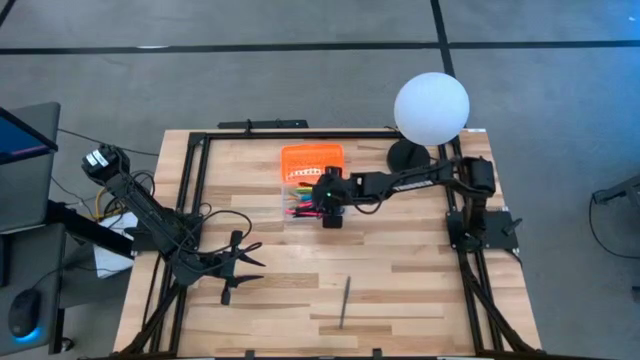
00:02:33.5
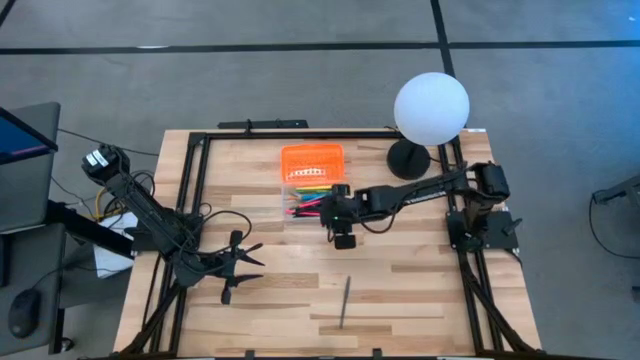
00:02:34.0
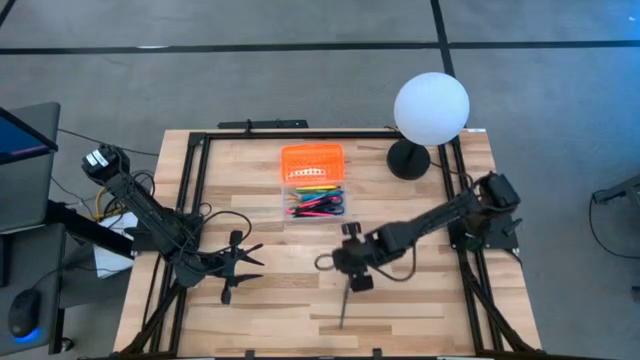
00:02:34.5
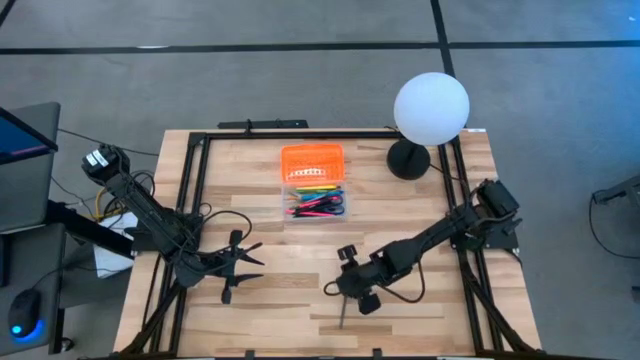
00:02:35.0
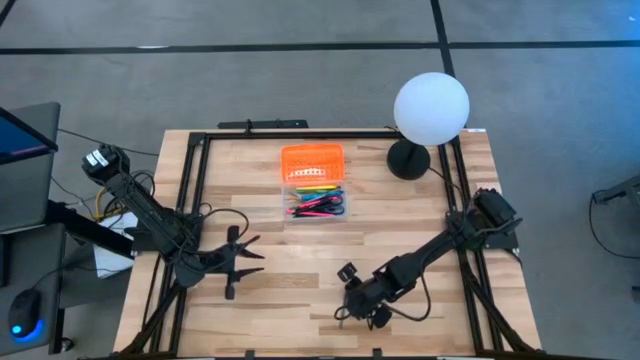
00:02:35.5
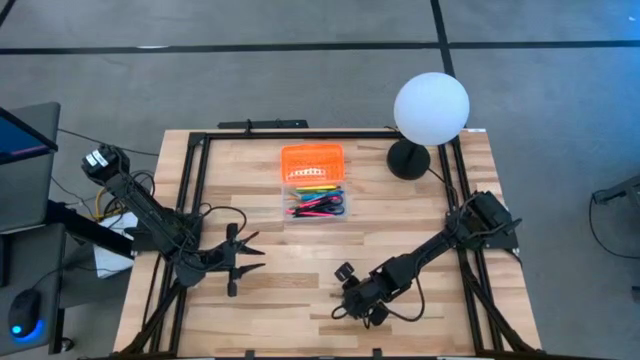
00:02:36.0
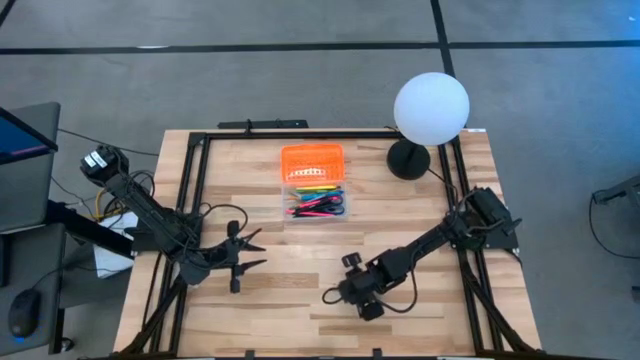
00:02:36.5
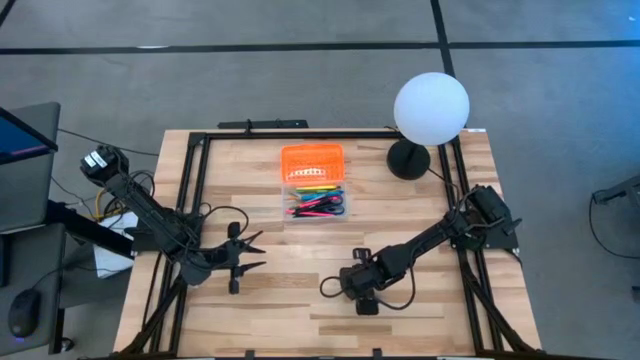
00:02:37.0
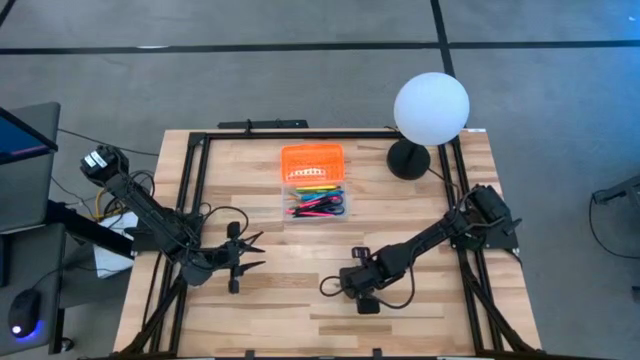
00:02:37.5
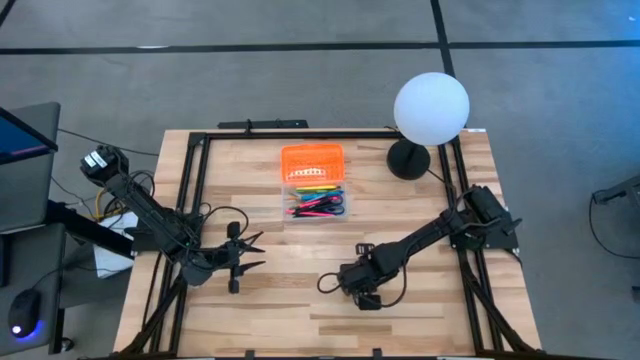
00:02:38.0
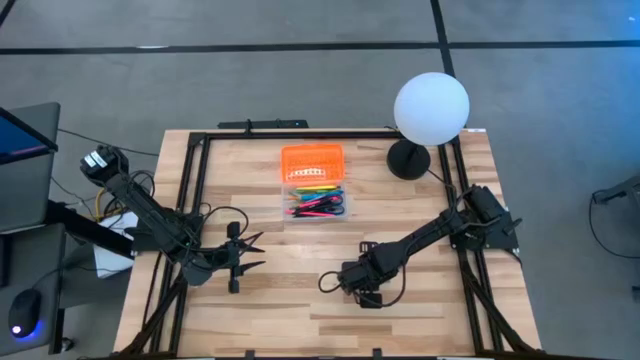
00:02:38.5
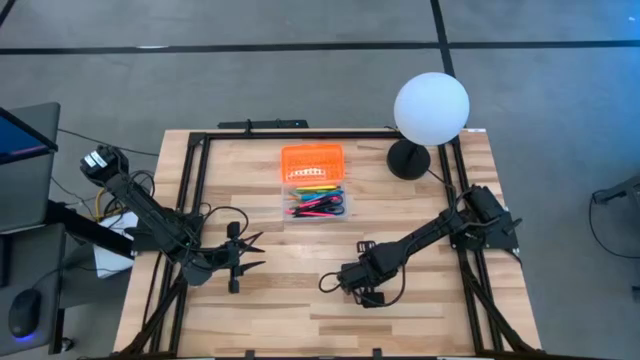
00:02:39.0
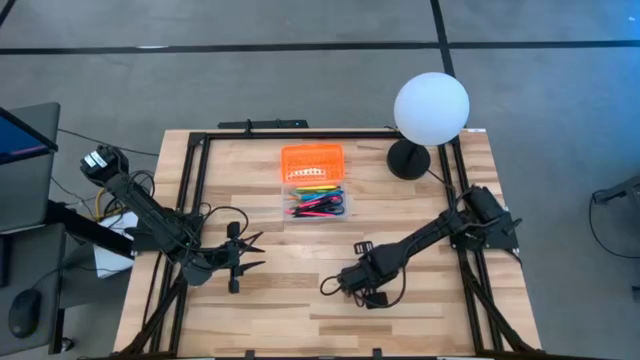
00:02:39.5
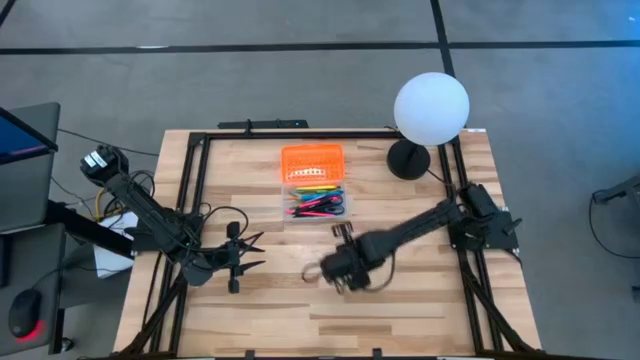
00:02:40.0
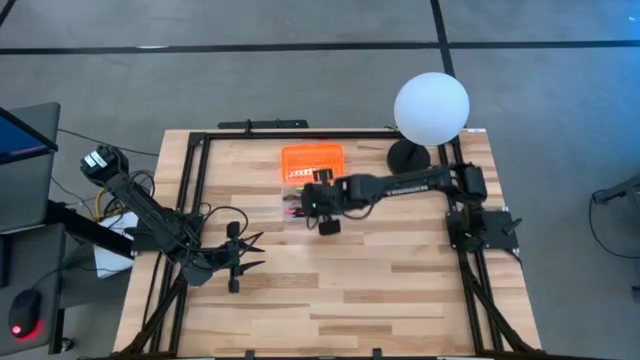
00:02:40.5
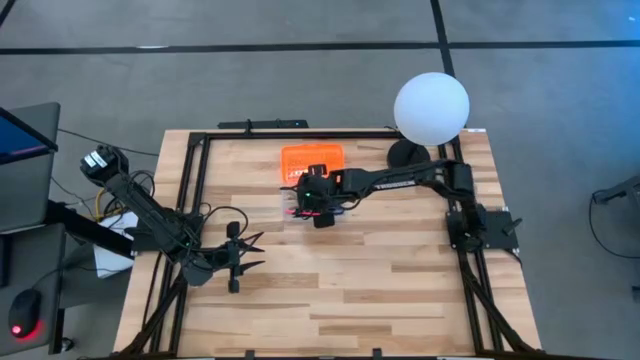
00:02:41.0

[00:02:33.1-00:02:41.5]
Task: Pick & place school supplies into a supply box
Put the gray pen into the supply box

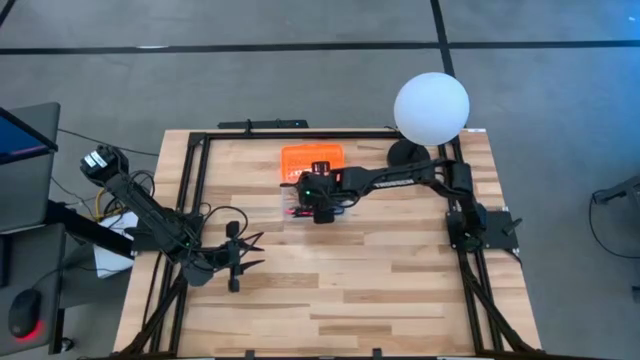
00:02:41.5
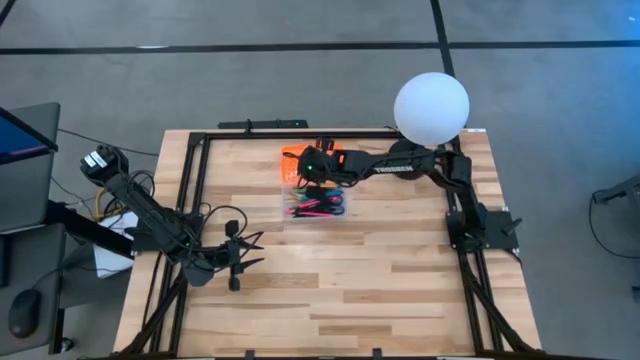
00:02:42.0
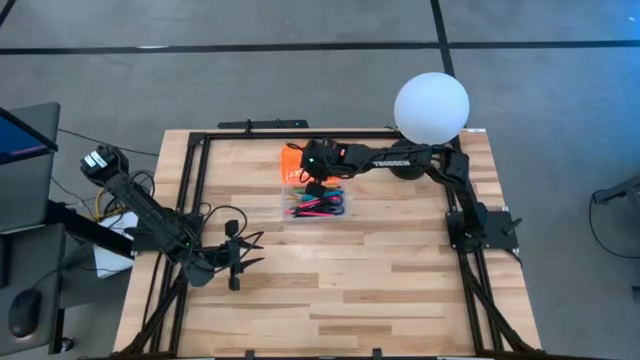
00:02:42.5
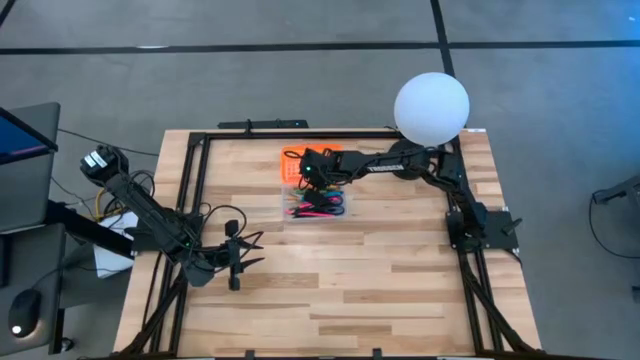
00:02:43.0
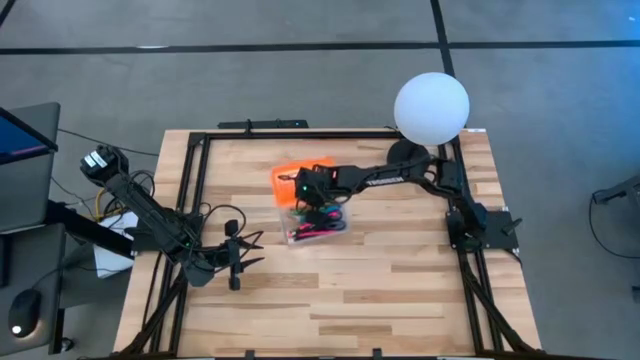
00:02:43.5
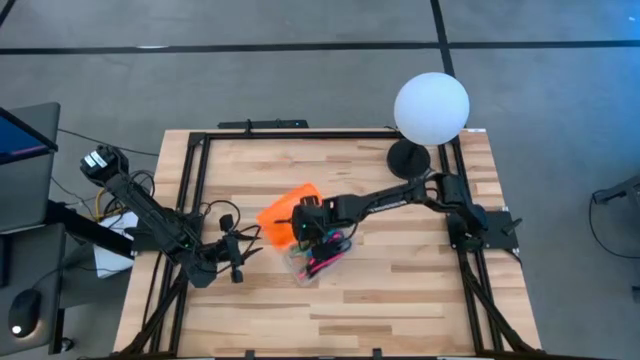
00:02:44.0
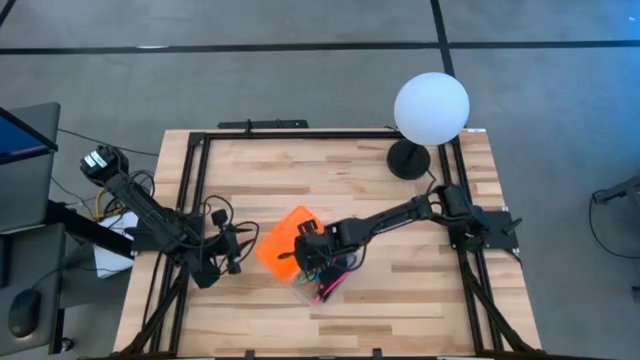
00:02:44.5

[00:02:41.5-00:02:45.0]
Move the supply box to the center of the table

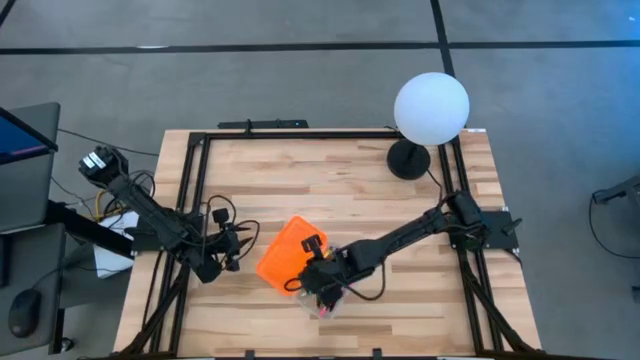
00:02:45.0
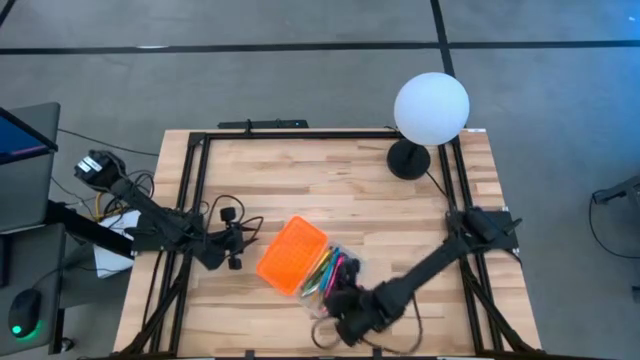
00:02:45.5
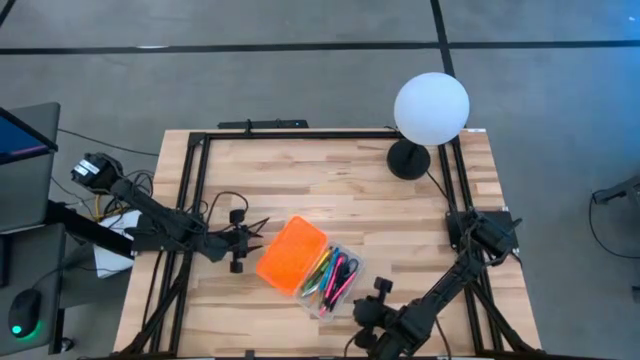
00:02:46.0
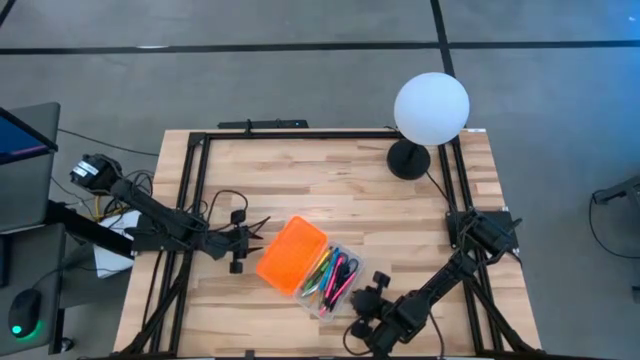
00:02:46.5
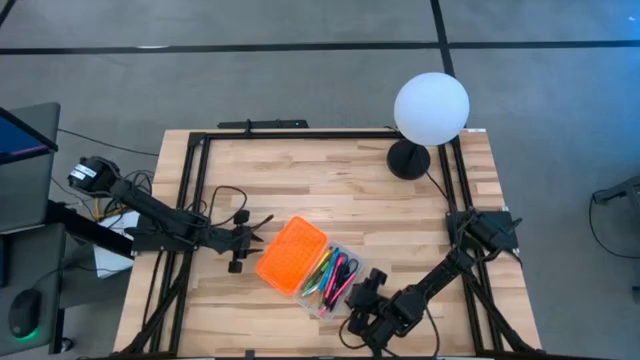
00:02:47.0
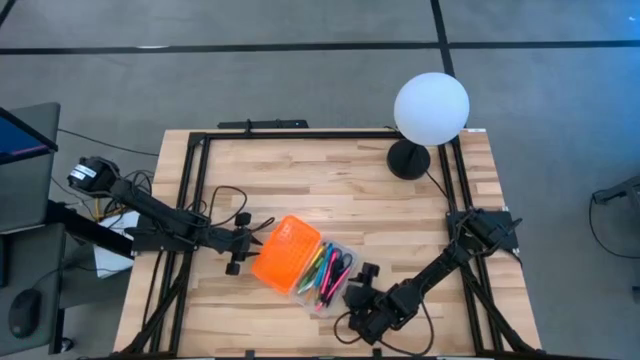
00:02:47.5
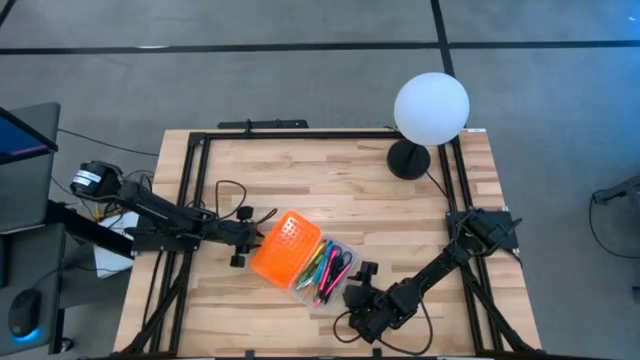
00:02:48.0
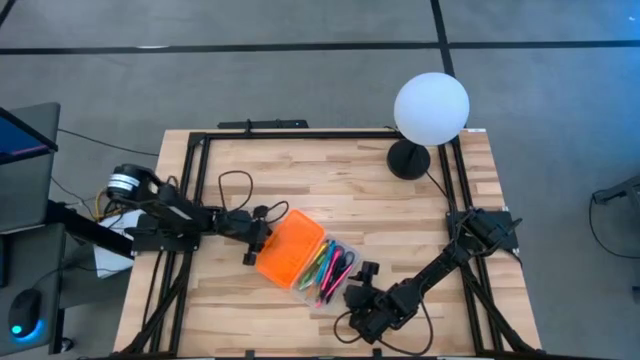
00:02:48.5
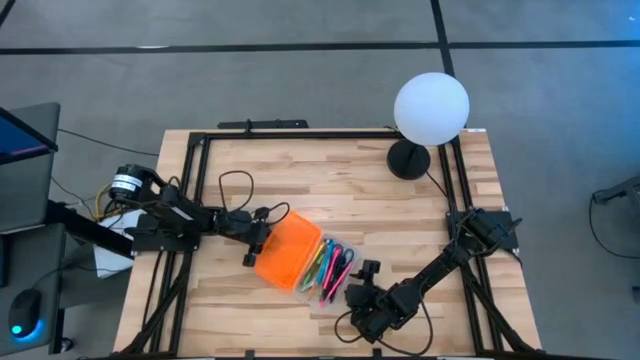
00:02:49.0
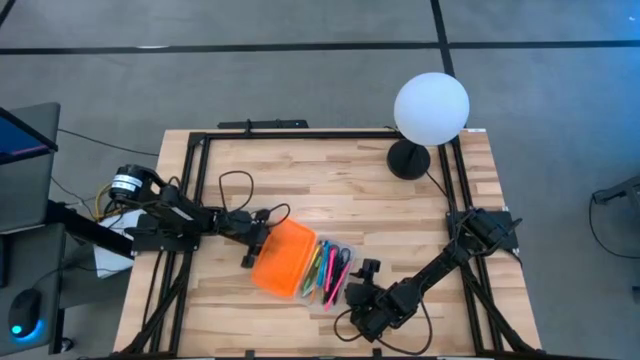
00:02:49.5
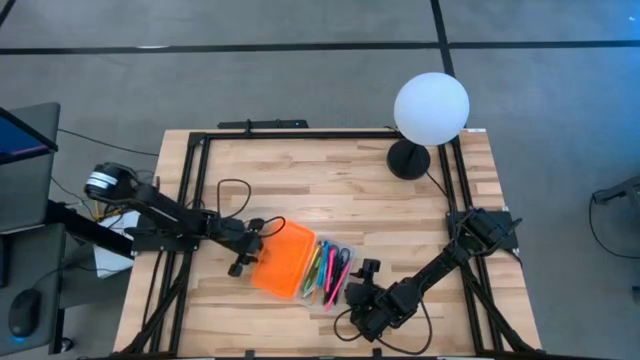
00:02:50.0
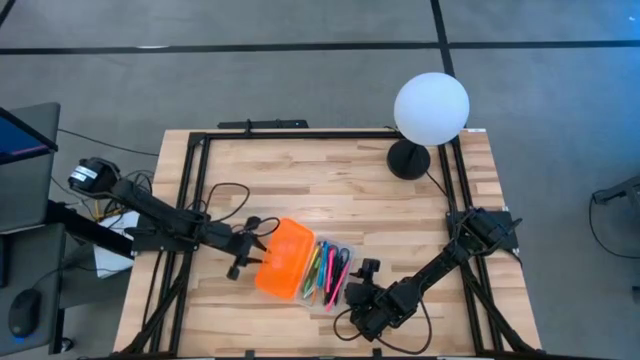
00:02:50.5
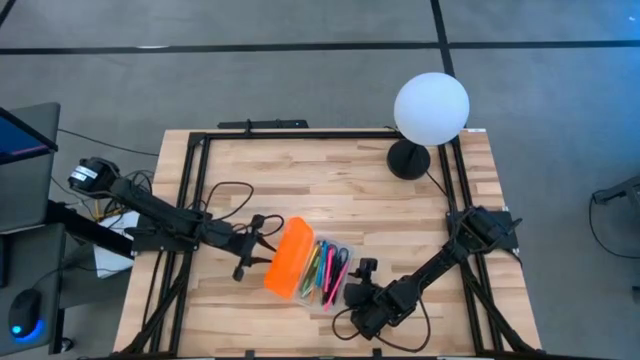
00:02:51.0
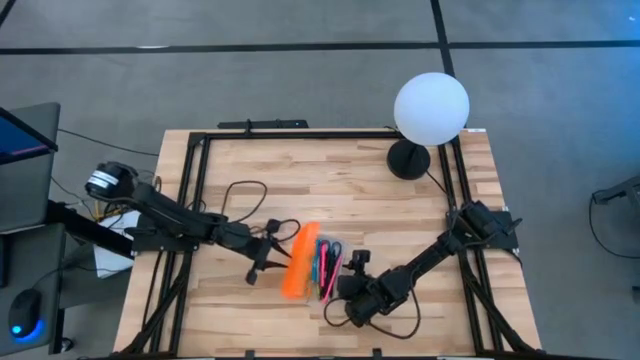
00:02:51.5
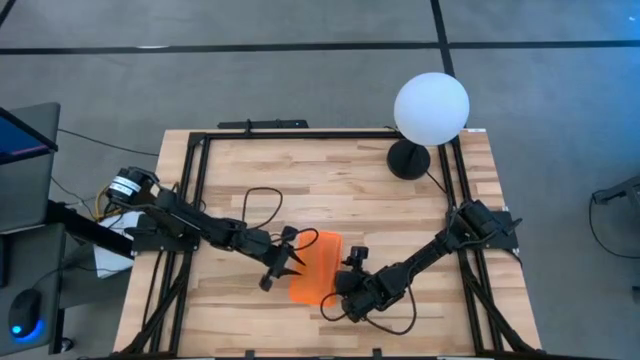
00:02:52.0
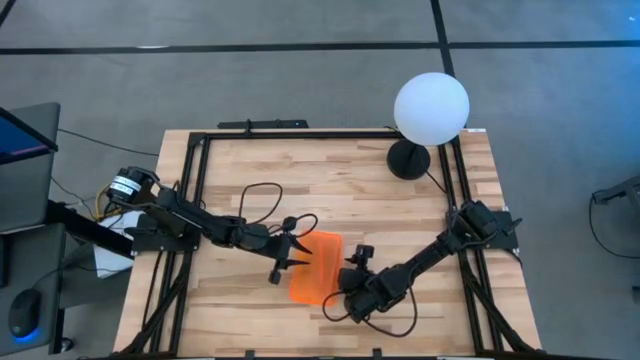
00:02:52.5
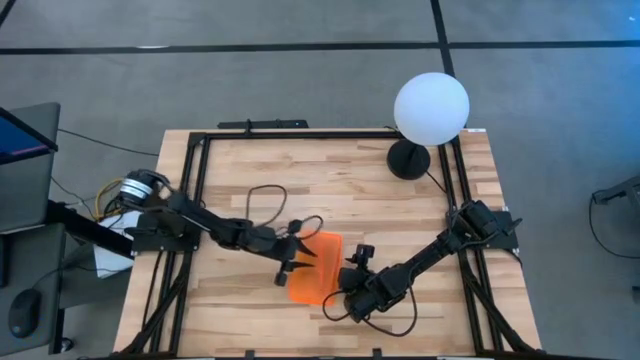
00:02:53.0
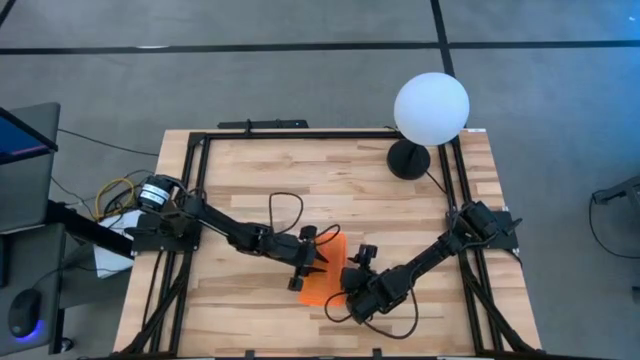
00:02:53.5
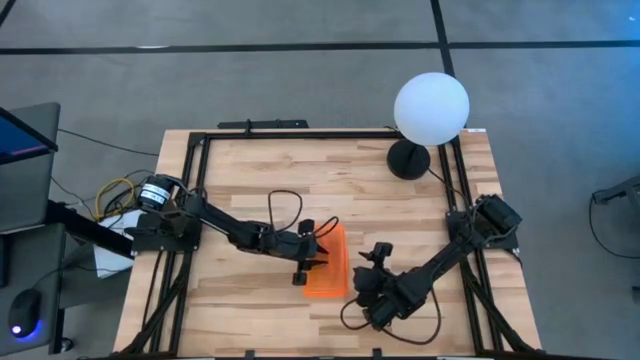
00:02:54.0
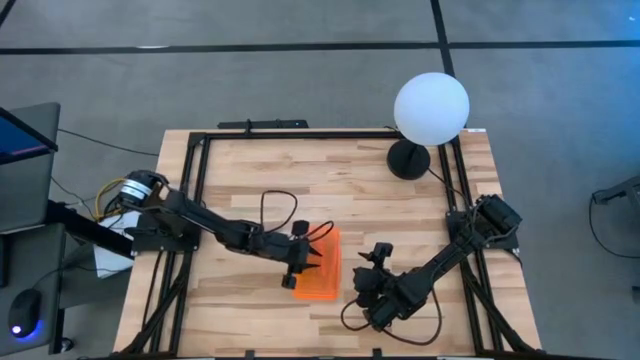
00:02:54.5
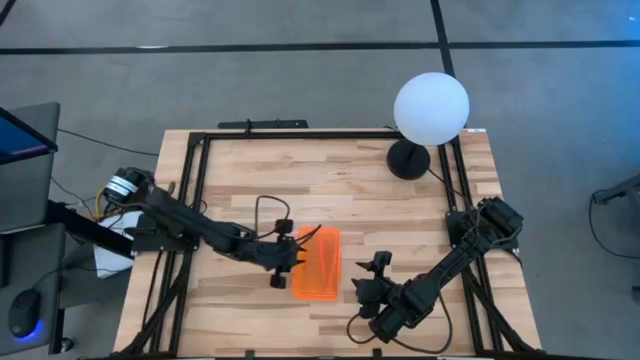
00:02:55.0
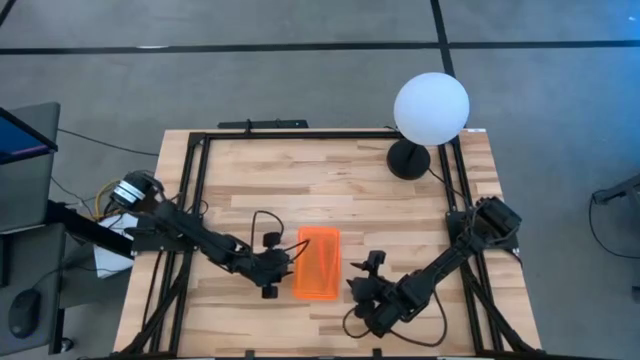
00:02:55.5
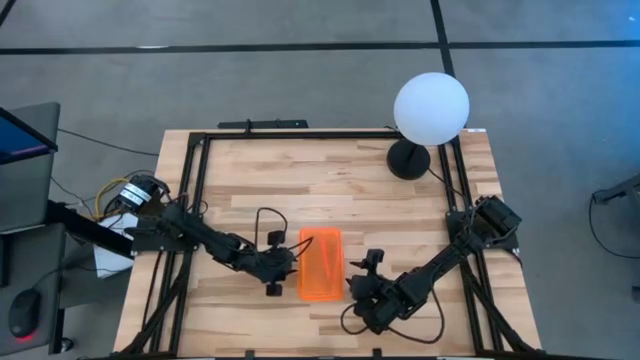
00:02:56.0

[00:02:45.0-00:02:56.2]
Close the supply box
